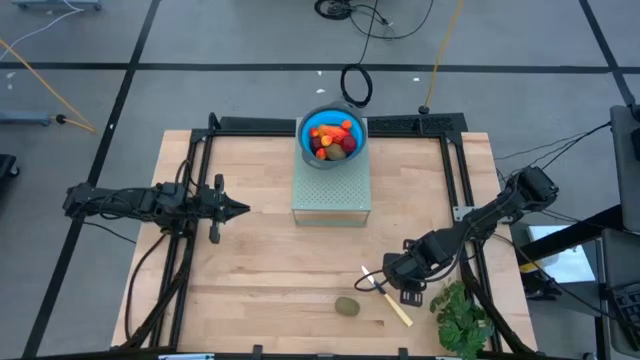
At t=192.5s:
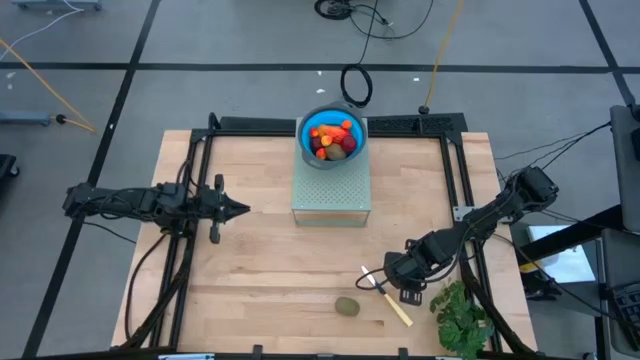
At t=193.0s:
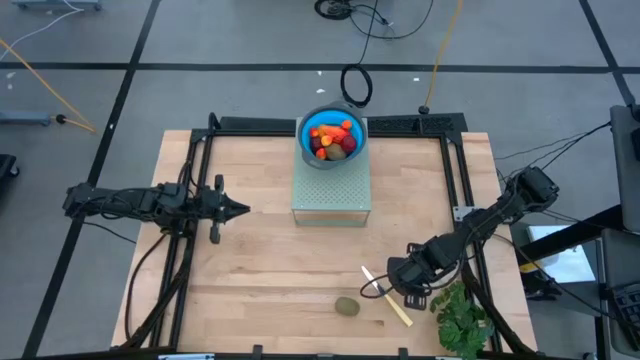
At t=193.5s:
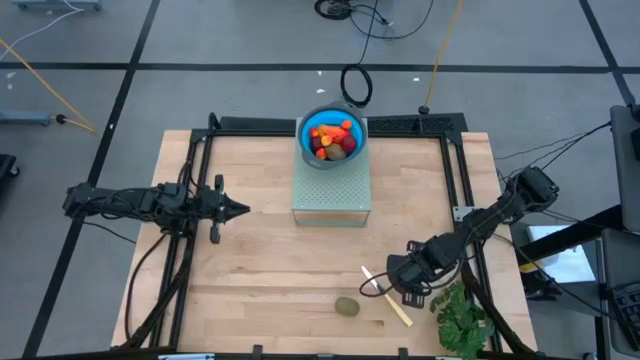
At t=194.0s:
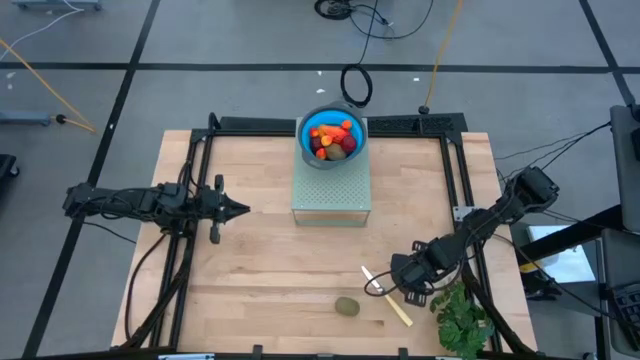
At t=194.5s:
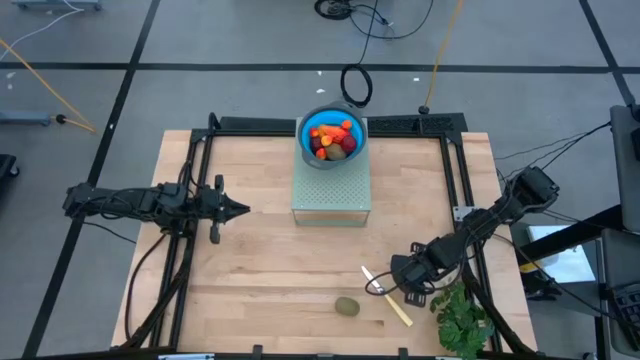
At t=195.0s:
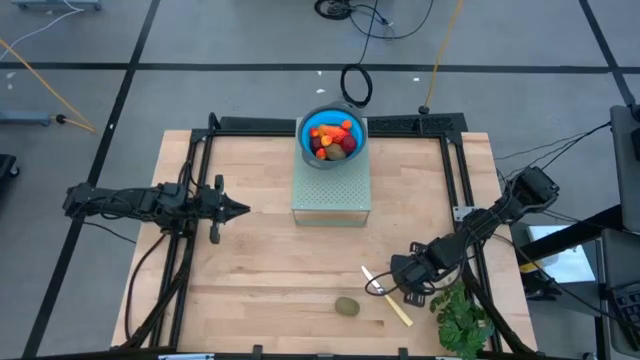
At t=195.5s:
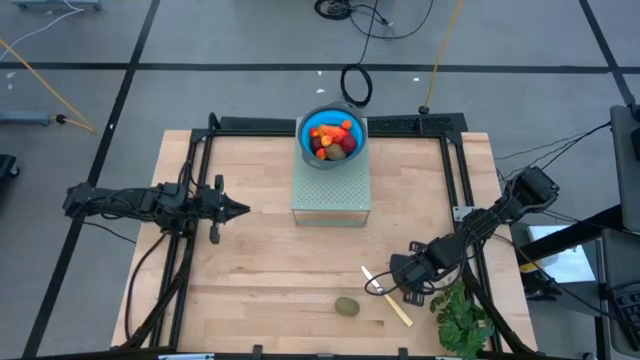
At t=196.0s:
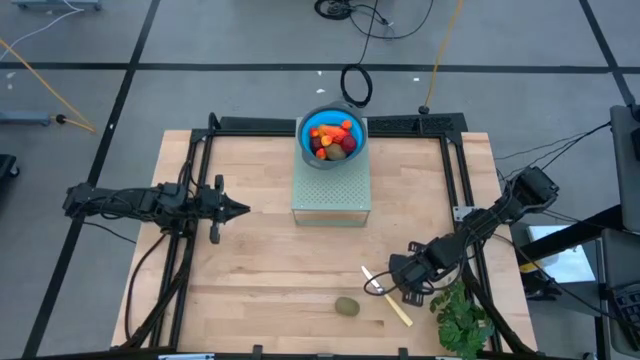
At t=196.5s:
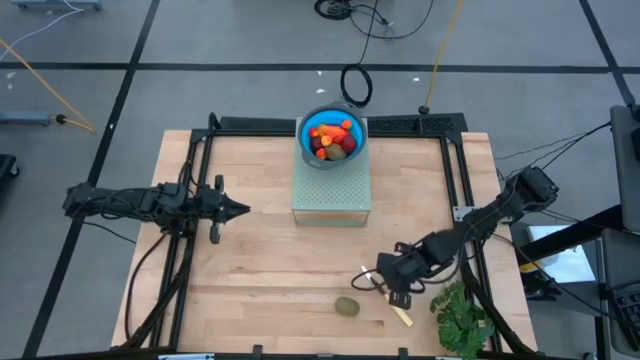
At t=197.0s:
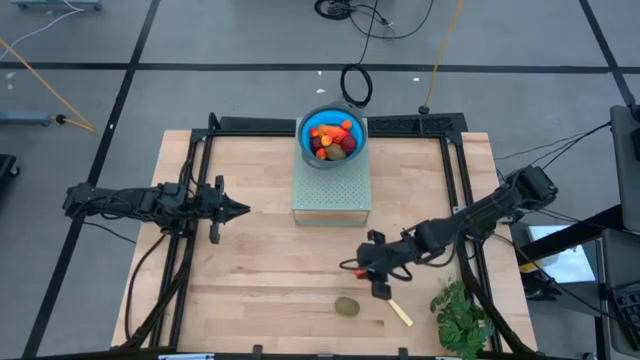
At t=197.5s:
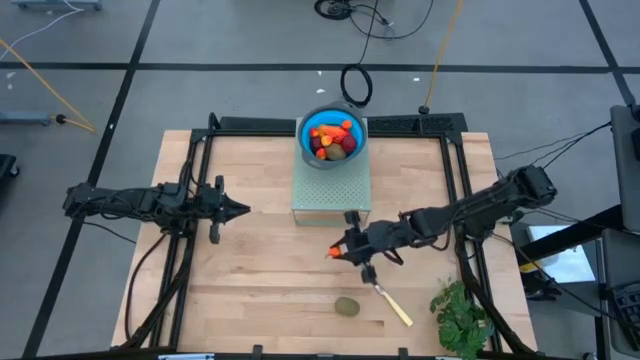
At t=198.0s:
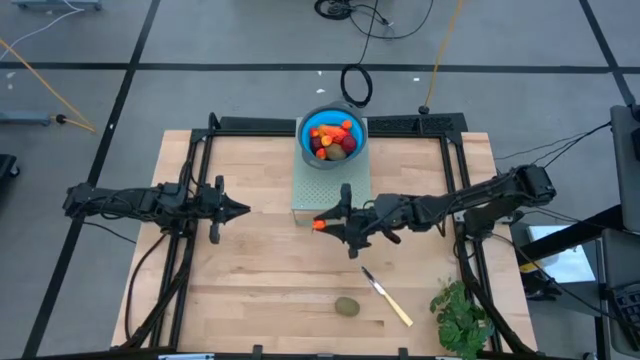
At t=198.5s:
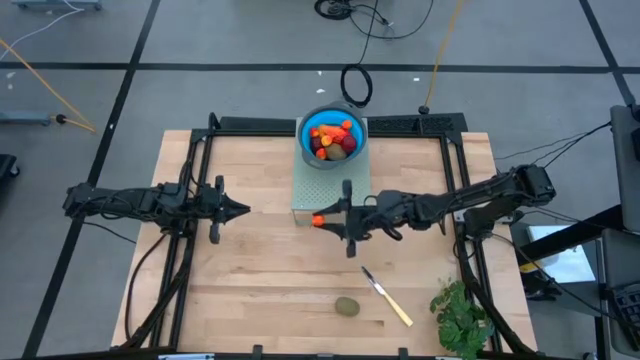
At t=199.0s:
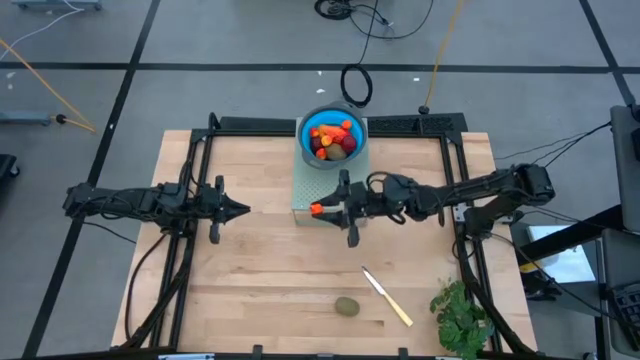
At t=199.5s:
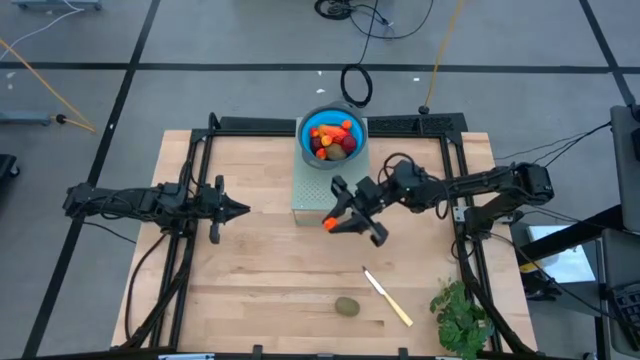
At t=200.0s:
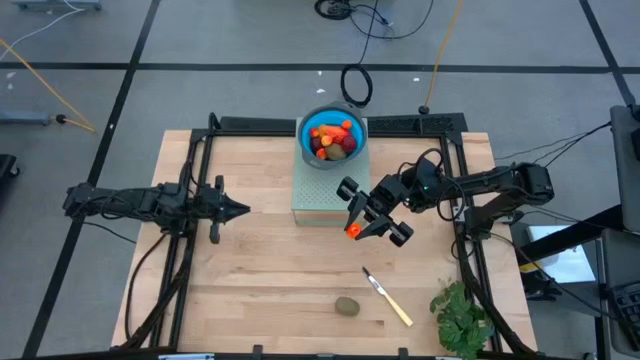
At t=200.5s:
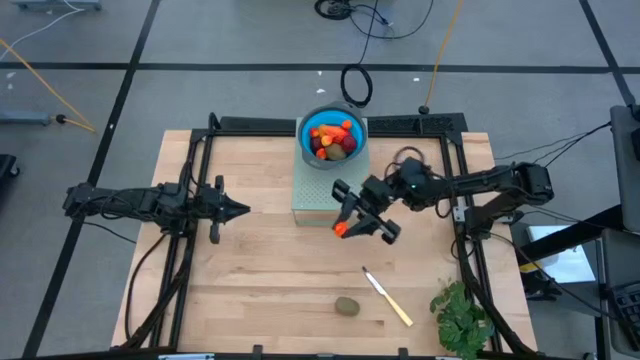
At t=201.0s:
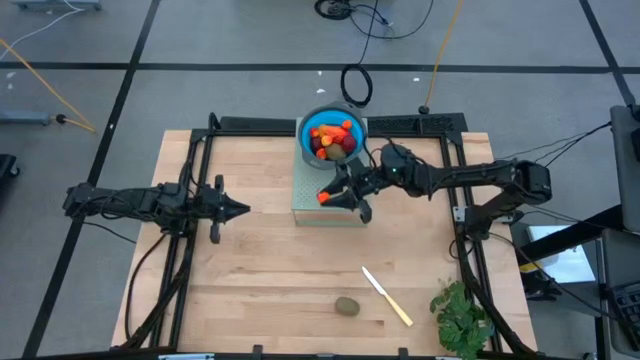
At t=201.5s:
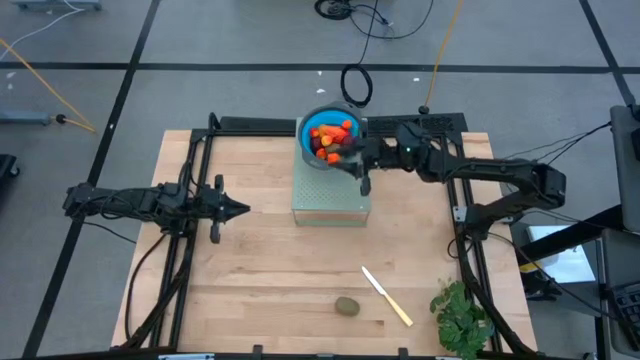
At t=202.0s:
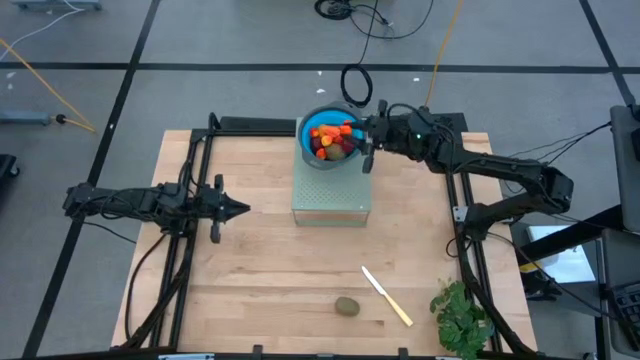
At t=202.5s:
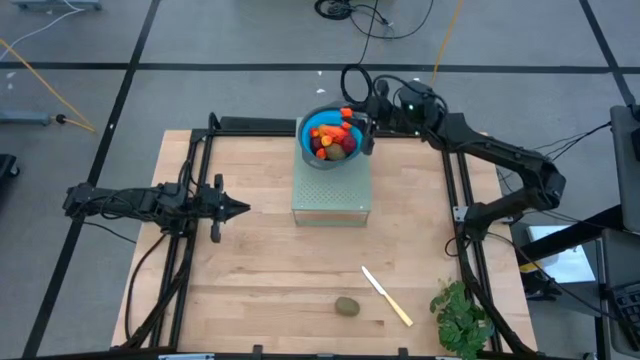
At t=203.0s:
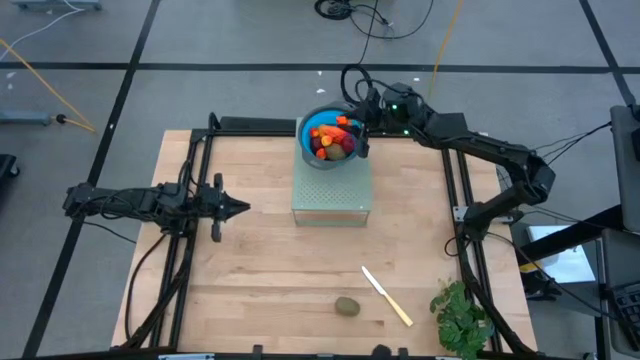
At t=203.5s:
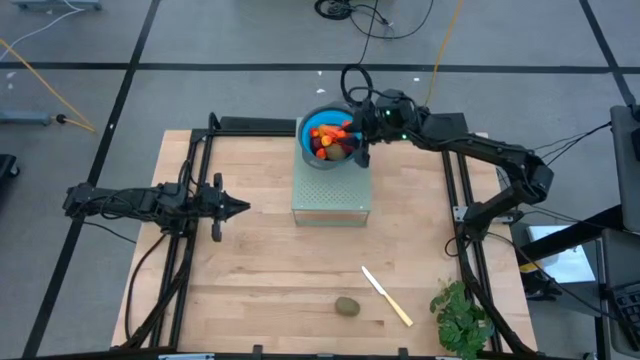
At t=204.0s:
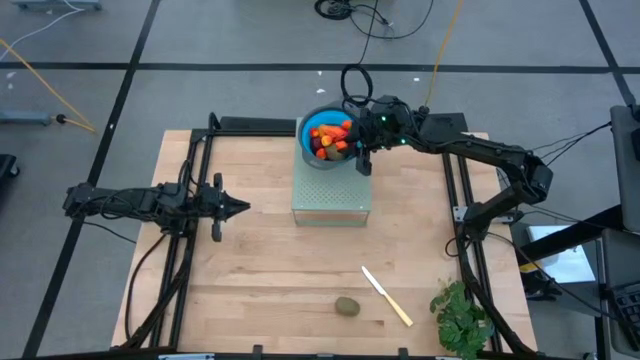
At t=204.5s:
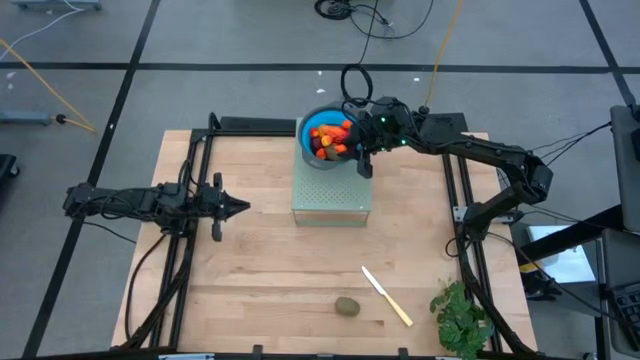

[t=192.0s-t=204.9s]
Task: Pick & Place Fruit
Put the peach into the blue strainer bowl on the shelf

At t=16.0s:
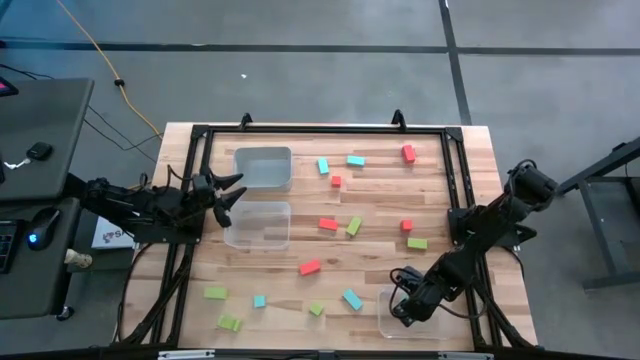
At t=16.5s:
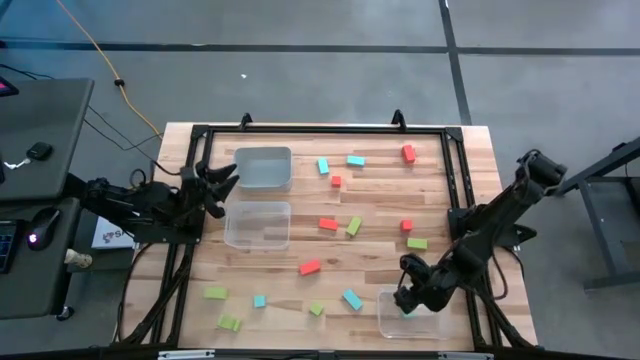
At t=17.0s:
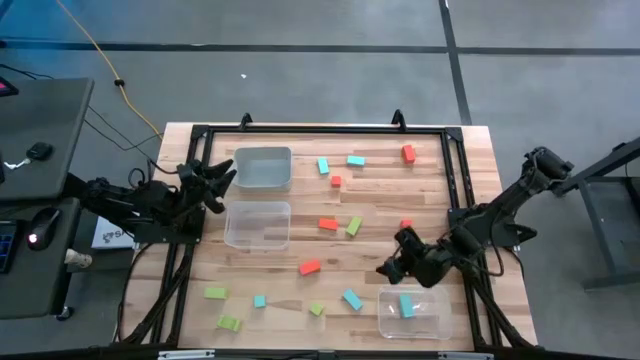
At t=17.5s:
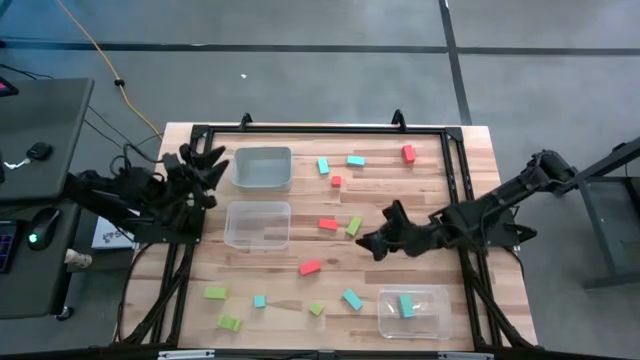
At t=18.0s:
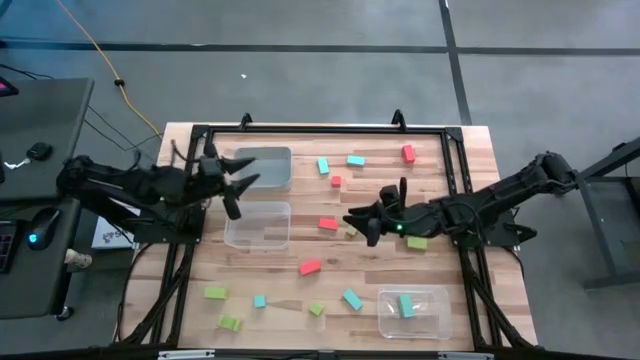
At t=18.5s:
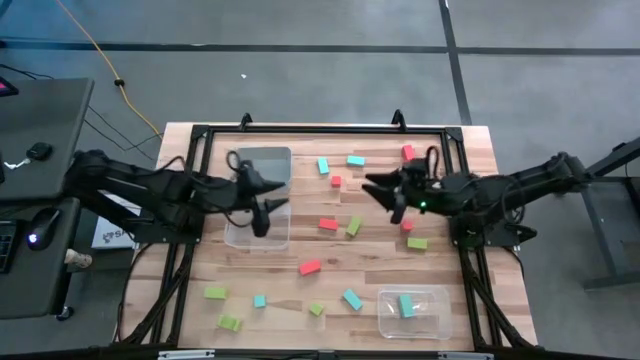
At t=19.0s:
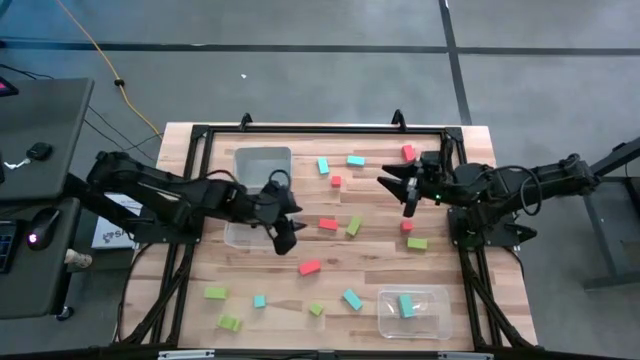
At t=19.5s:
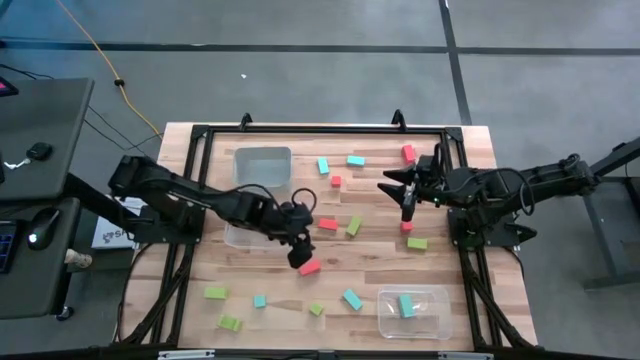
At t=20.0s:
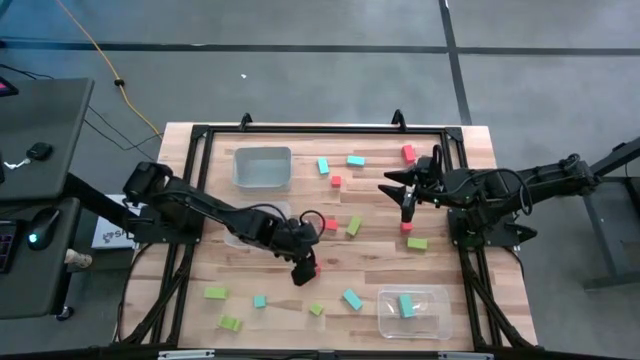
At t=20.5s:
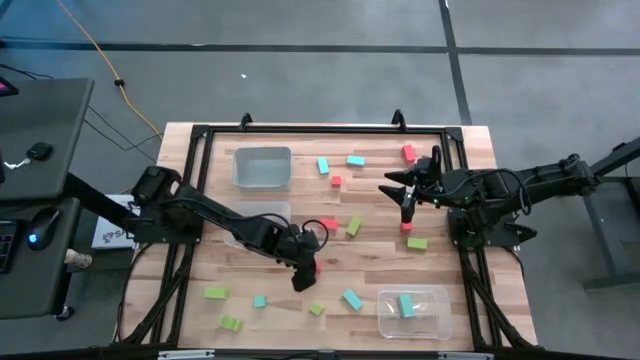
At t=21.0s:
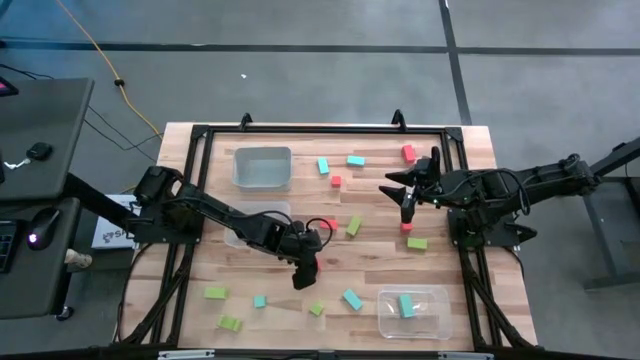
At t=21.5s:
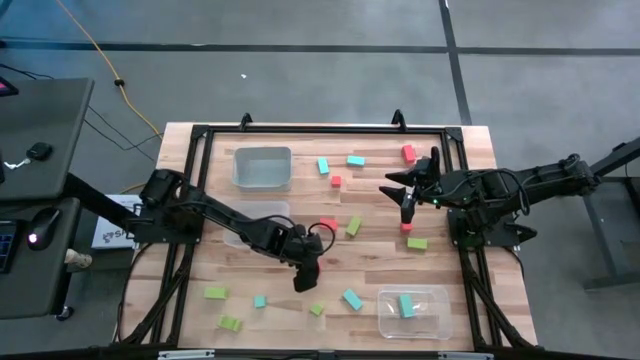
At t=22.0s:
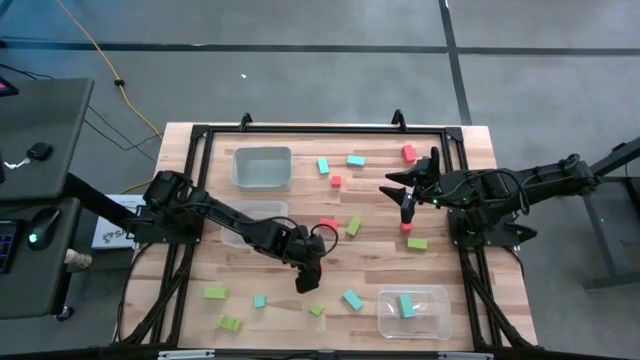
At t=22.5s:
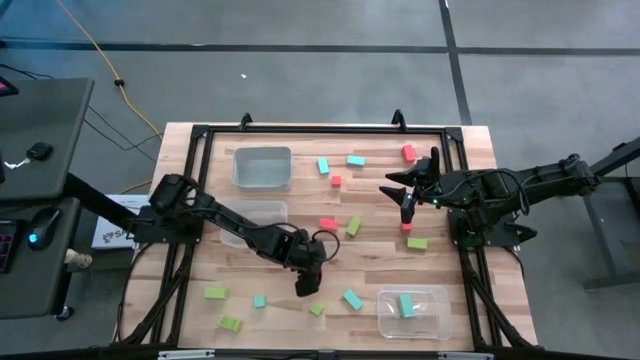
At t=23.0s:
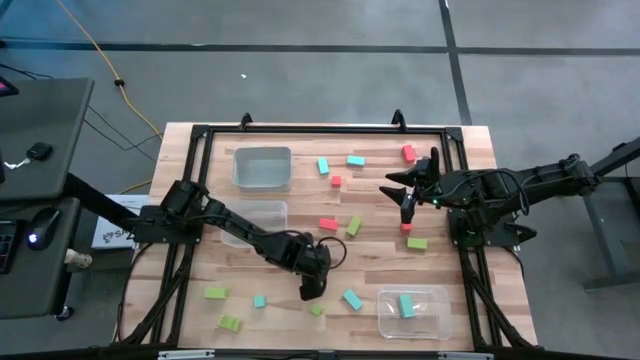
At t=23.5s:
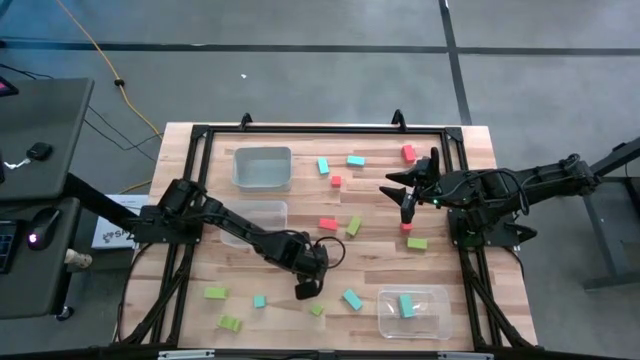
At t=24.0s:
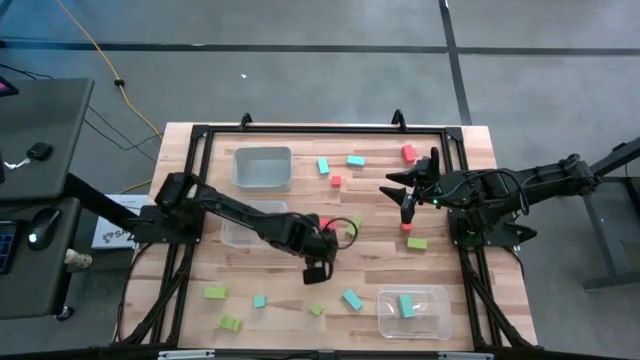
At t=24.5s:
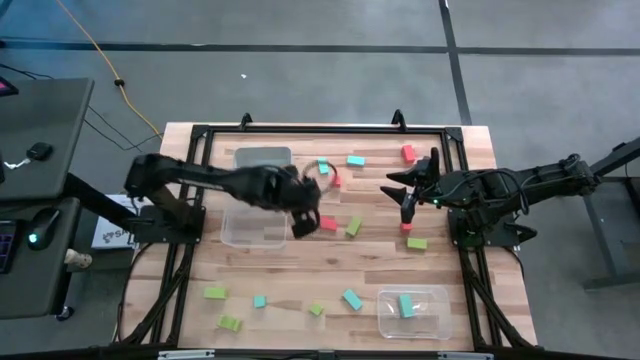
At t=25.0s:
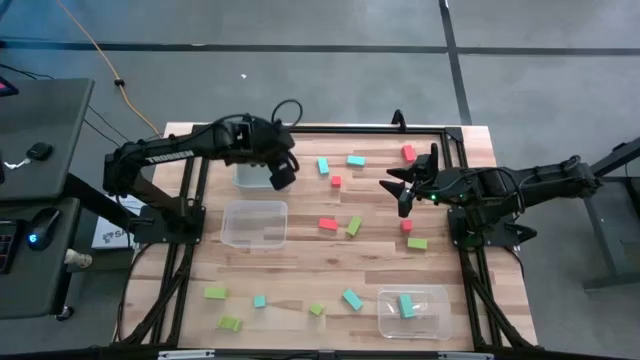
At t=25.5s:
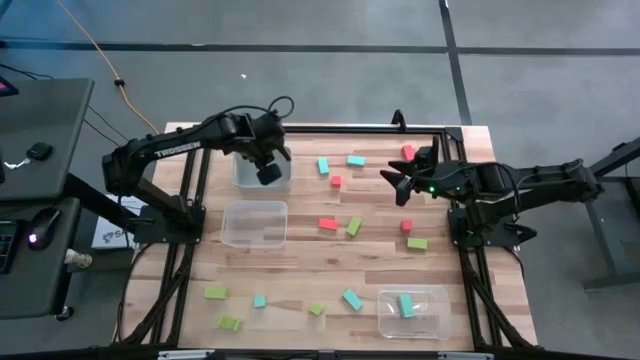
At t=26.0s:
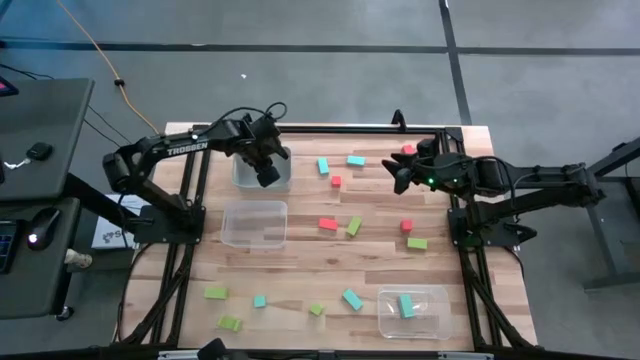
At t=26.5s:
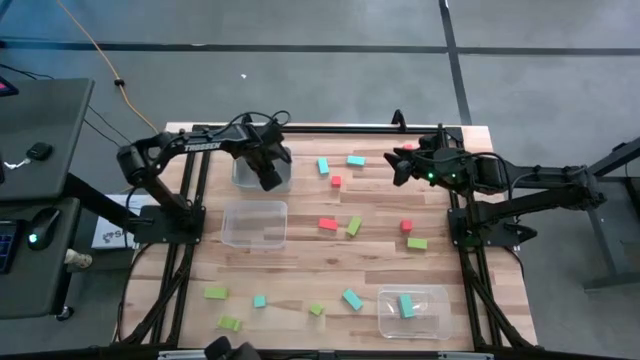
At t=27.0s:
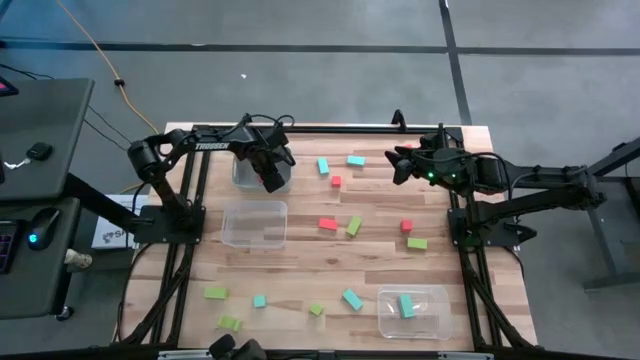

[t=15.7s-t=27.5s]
Task: Sort & place blocks by color
Put the orange block into the gray bin
